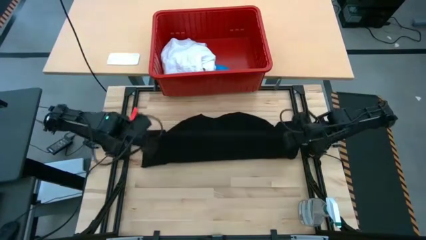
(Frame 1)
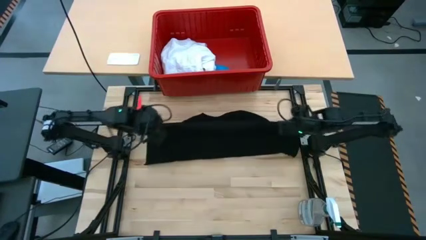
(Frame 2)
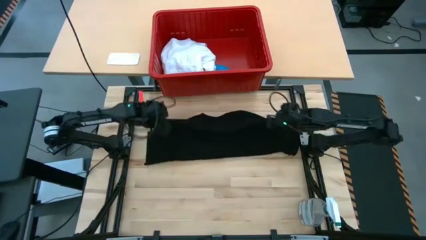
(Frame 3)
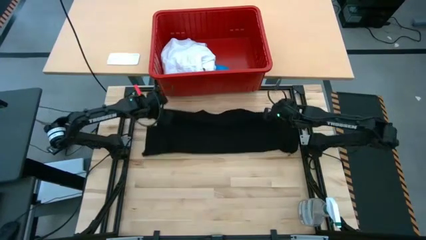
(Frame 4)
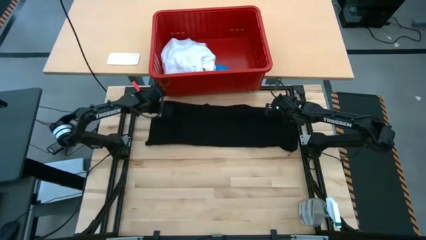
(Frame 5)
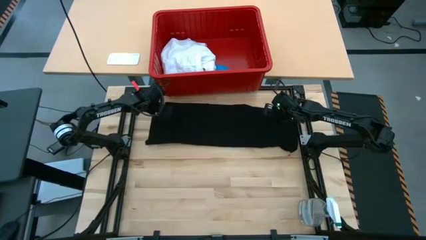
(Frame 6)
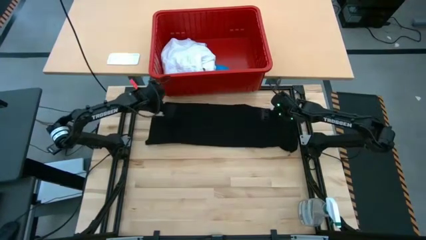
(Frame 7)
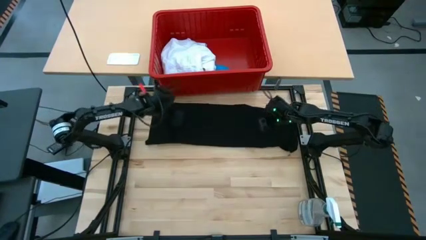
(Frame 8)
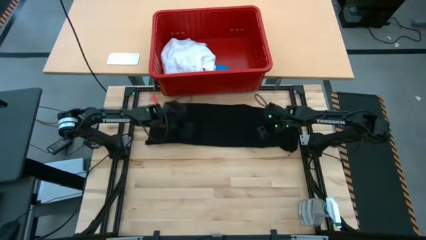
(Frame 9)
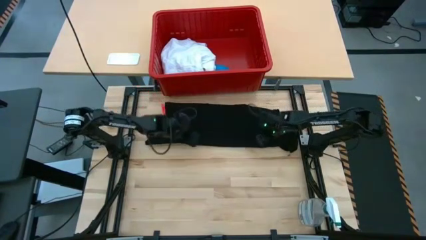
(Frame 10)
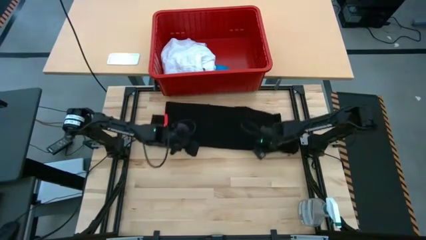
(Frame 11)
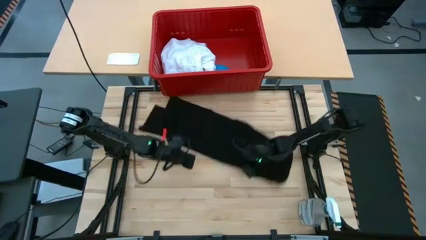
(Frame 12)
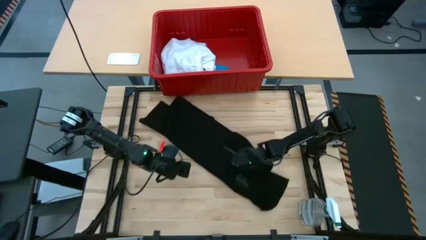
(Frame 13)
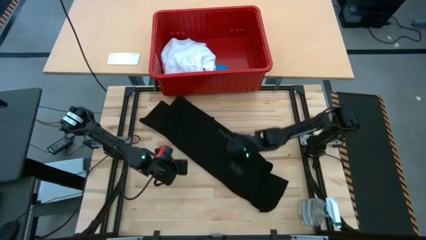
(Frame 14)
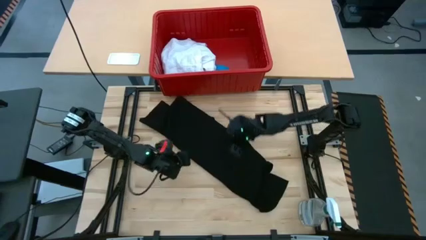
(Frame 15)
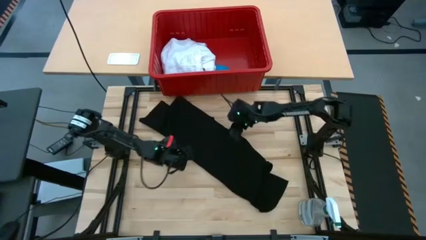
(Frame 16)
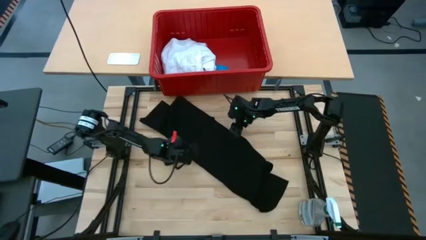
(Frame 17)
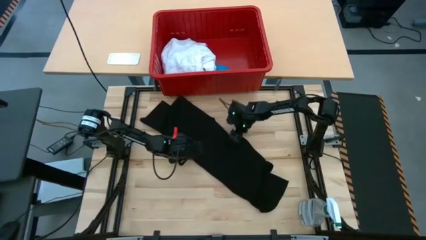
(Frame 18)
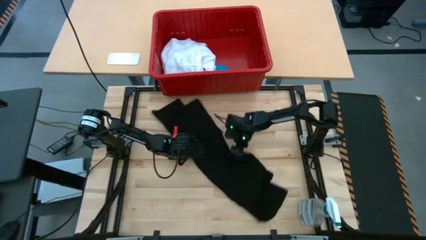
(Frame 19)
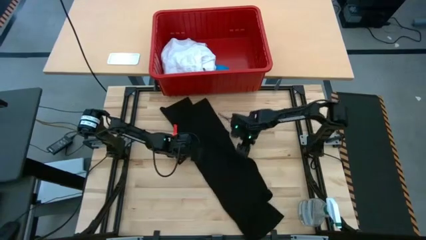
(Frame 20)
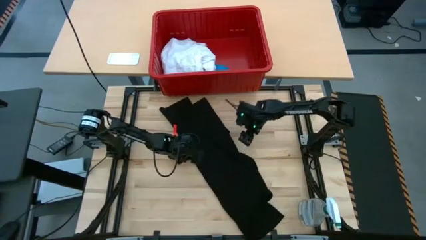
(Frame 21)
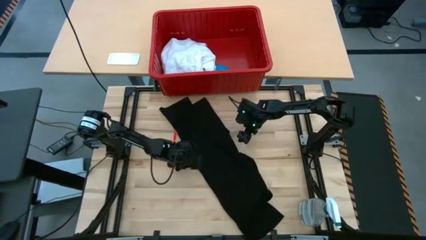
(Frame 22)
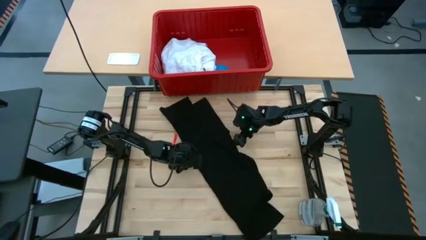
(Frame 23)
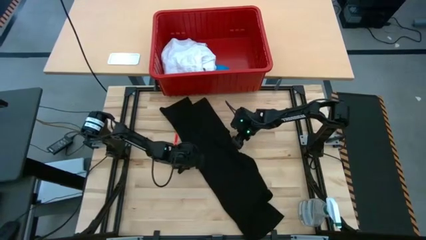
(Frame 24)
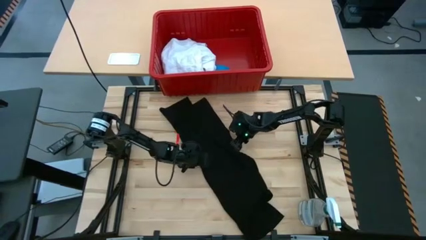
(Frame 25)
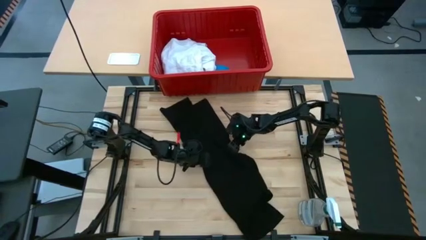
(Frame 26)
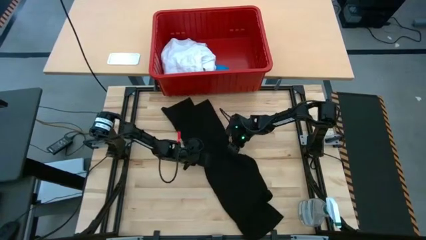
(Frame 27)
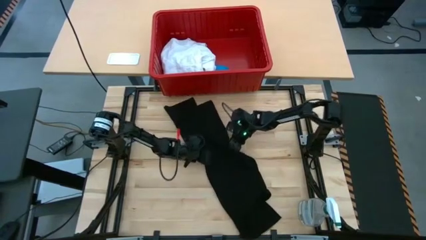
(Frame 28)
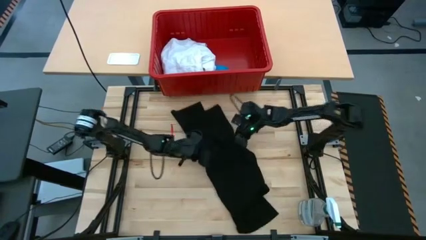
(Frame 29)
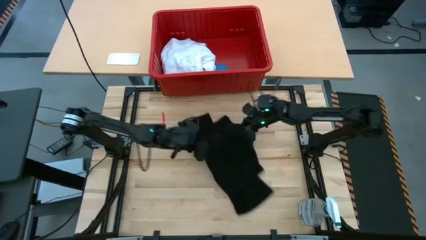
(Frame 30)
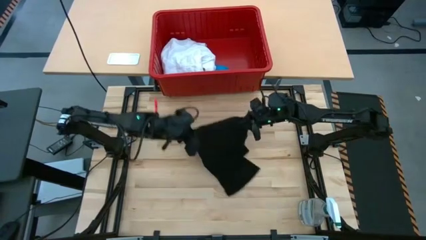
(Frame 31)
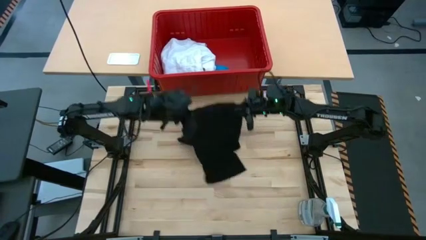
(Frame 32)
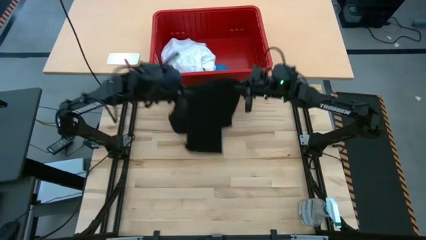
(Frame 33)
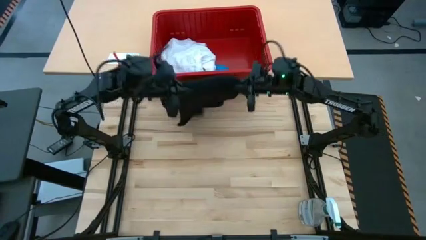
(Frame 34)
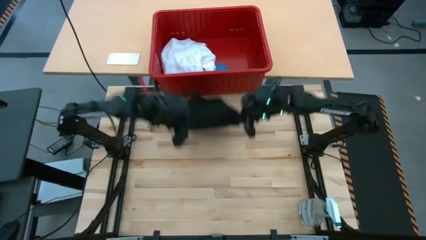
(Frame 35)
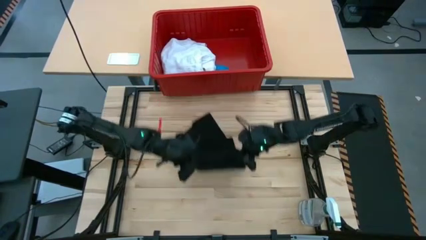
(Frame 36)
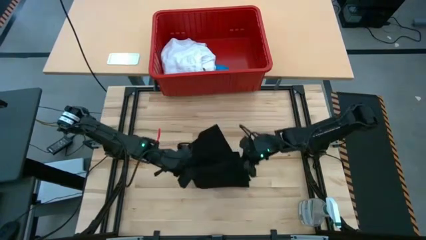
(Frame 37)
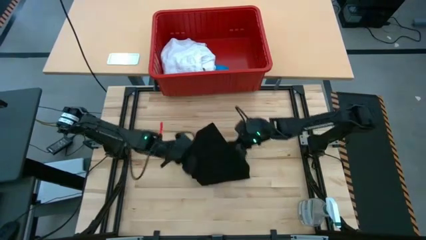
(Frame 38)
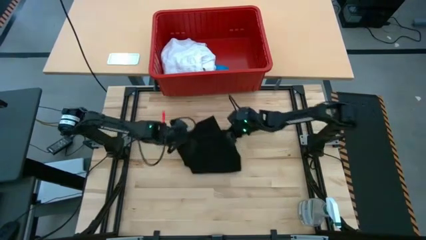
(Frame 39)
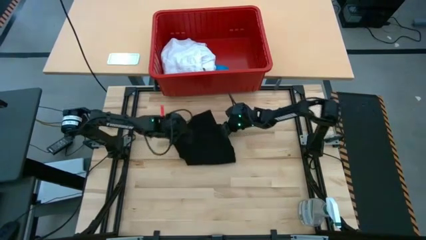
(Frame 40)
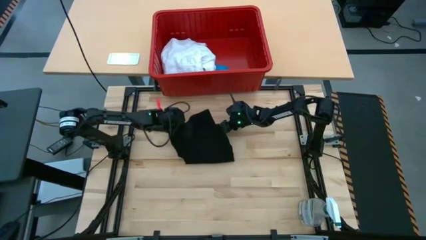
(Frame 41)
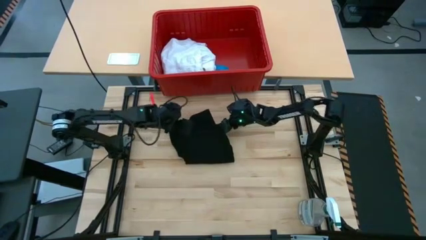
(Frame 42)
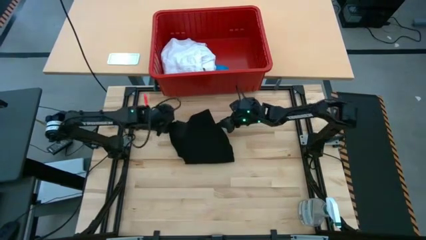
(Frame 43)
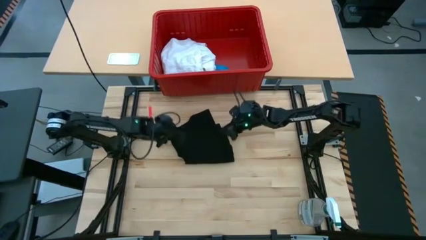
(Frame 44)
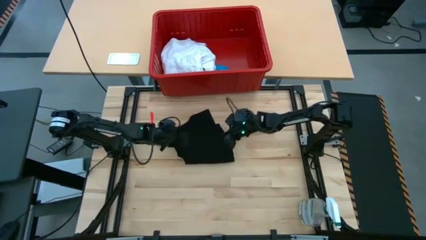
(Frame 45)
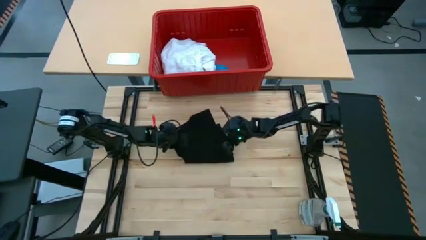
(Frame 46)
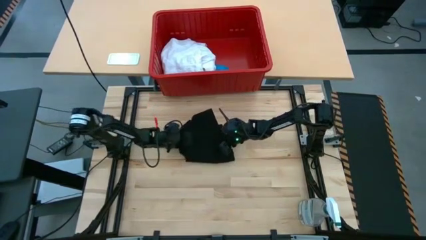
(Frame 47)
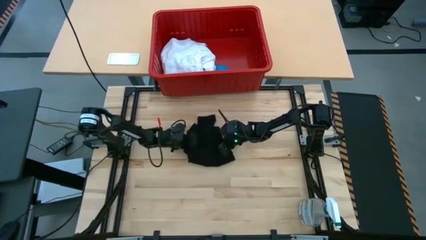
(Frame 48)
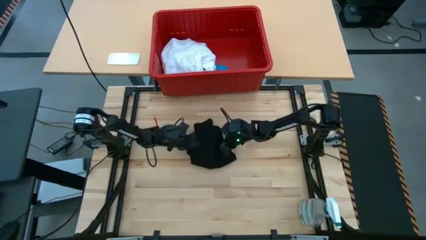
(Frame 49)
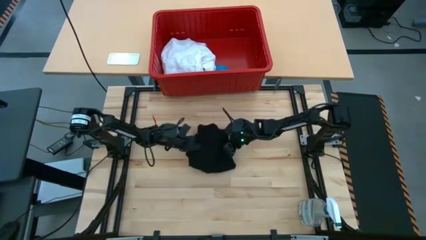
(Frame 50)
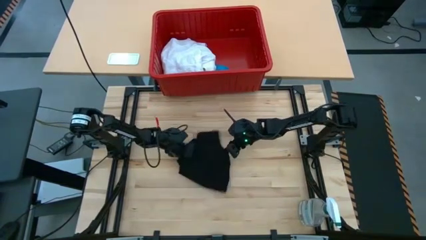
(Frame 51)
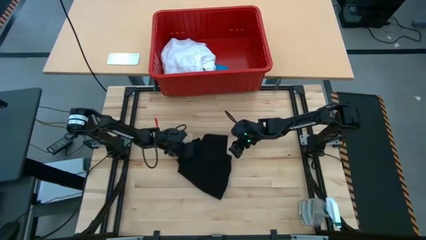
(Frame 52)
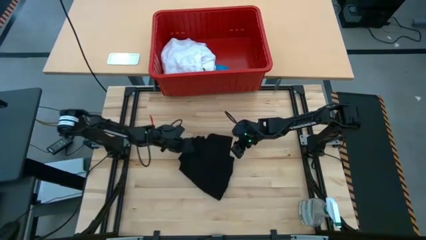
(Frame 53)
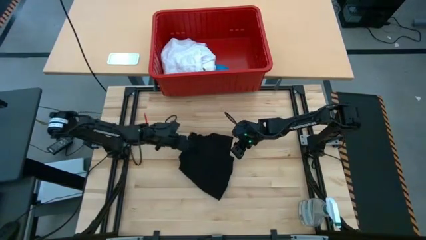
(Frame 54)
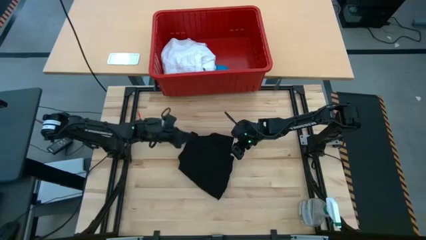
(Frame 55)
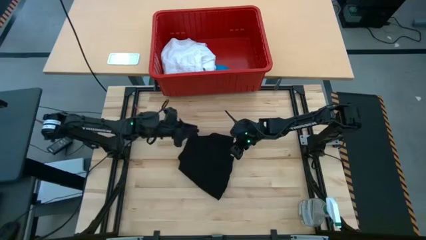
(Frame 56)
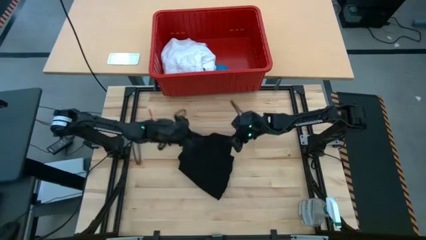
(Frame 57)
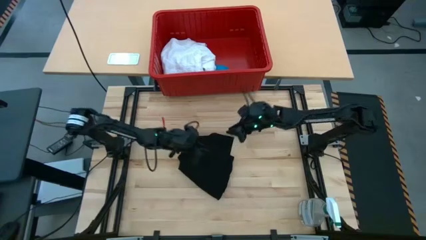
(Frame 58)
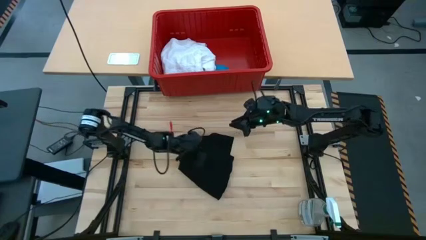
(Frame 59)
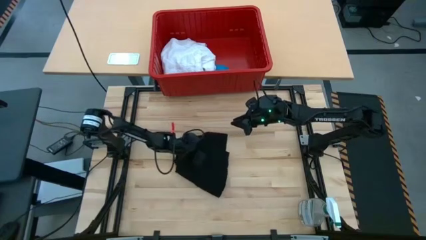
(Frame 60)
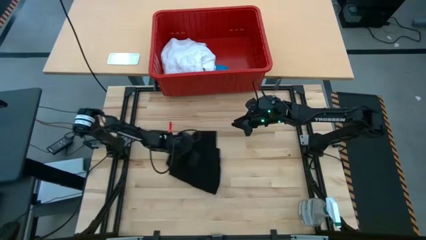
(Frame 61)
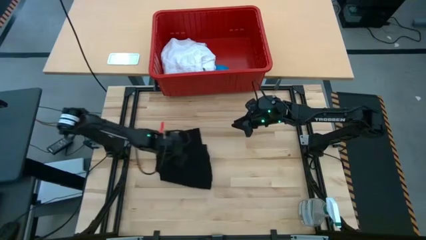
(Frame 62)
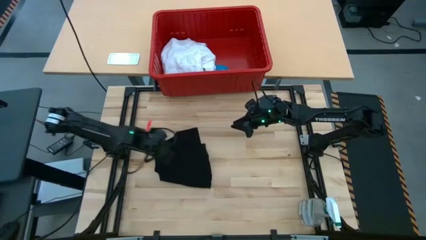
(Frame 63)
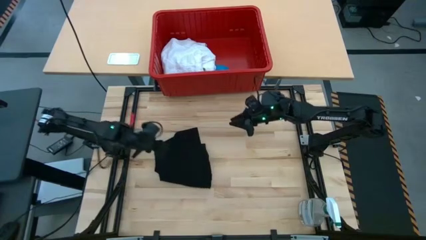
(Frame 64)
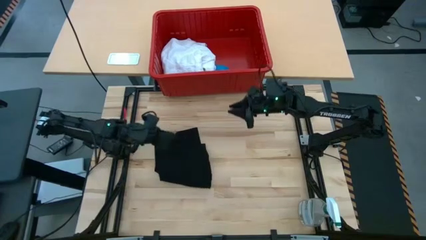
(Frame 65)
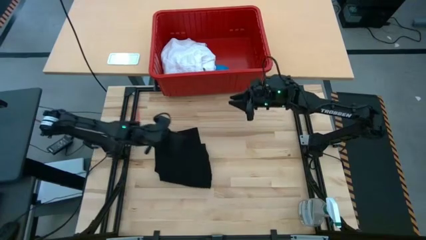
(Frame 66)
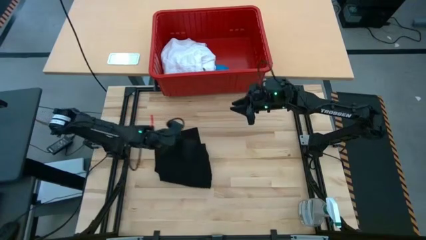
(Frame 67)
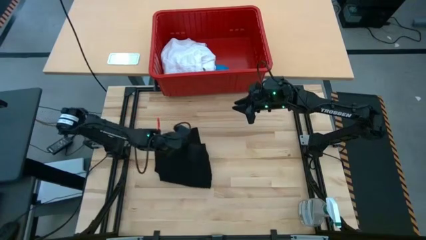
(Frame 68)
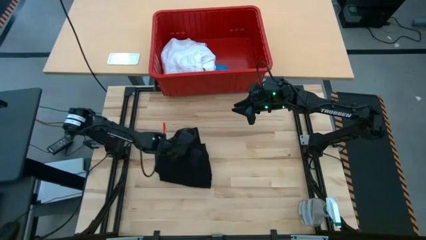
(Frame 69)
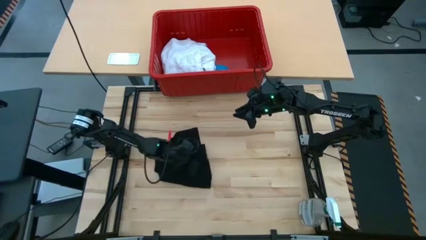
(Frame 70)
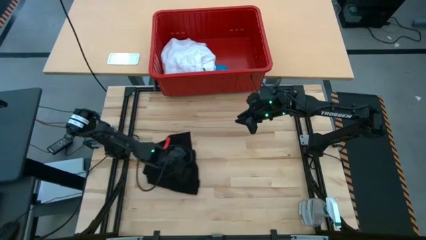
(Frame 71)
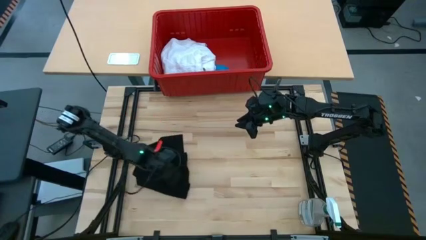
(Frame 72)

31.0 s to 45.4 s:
Task: Fold laundry
Fold the black shirt

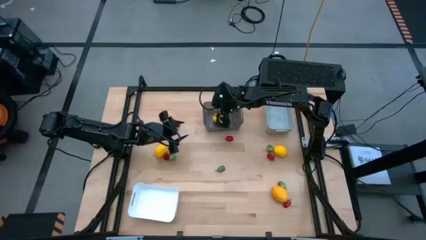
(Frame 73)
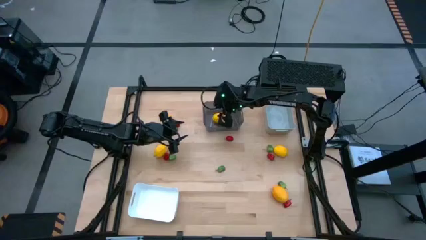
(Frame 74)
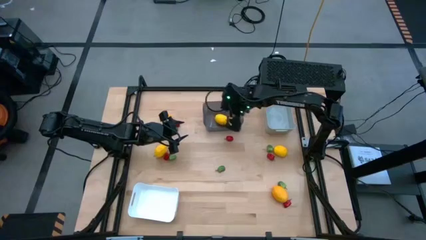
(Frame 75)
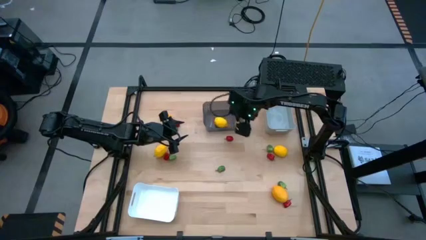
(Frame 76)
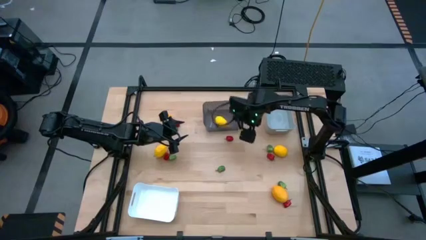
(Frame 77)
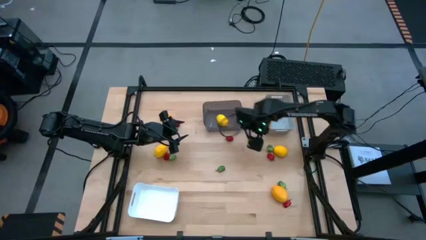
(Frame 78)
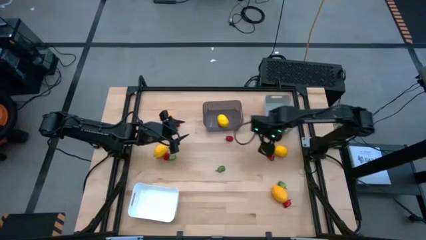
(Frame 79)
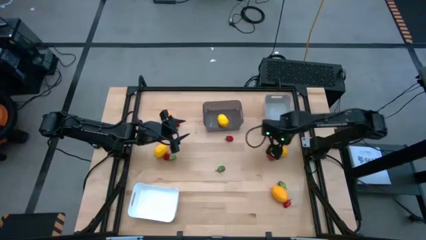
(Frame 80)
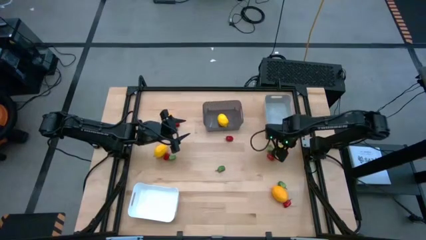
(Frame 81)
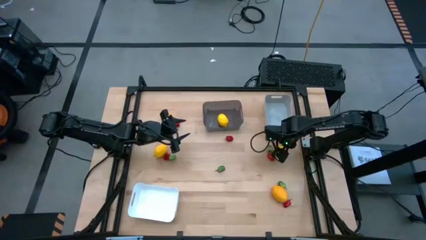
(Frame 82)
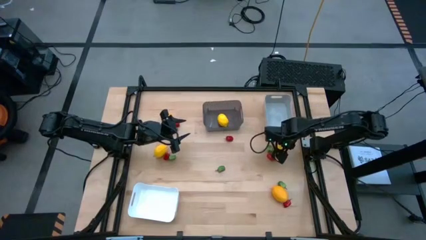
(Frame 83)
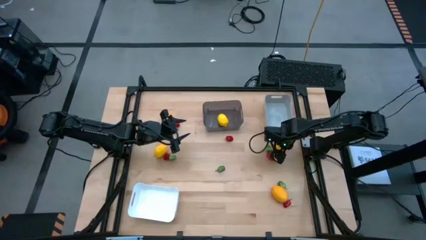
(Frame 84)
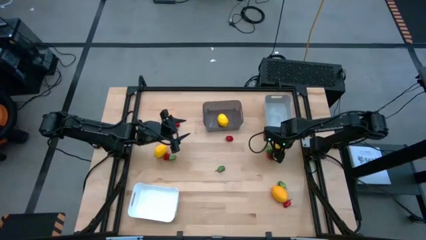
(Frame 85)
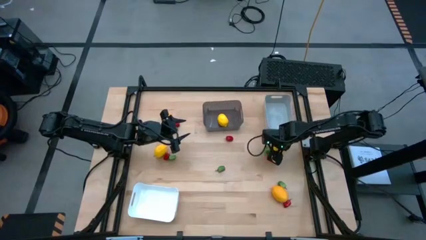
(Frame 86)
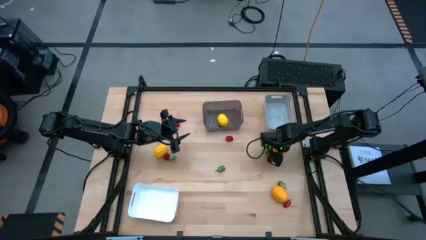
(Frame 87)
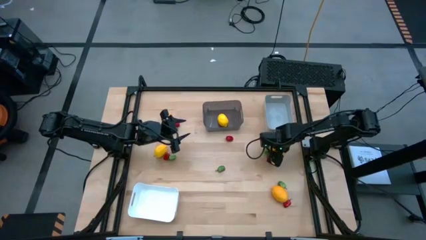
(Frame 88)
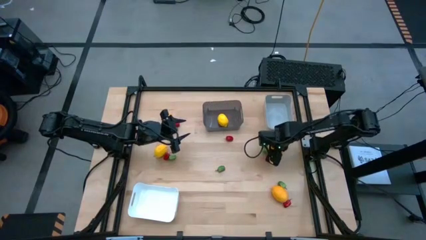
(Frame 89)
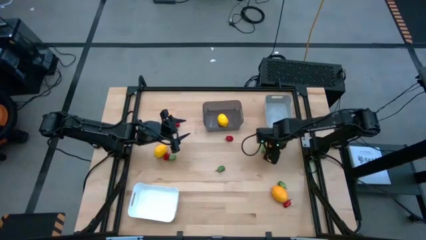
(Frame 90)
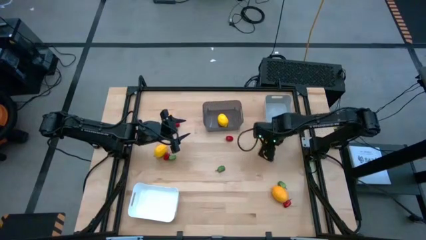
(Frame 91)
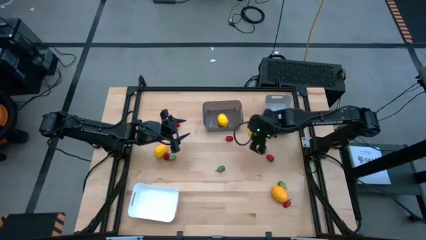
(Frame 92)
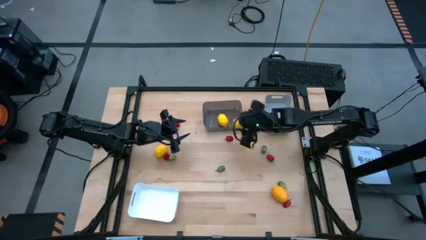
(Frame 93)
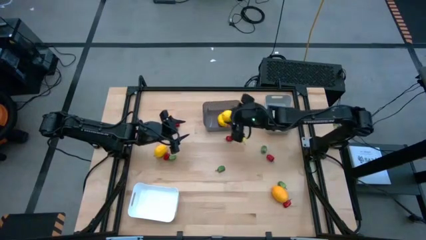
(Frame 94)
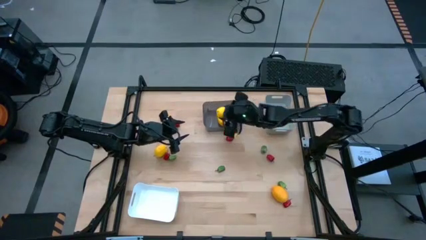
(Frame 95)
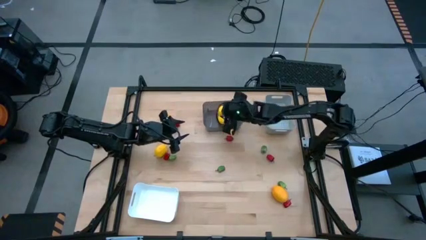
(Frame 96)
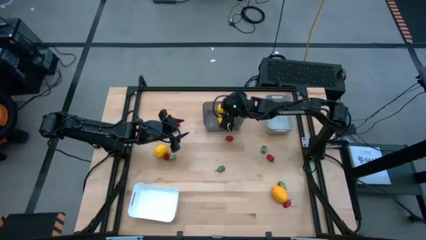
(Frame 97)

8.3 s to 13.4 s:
Task: Sort produce into baskets
Put the lemon into the black bin
